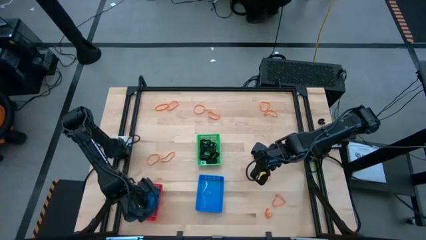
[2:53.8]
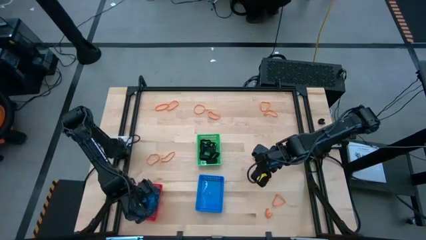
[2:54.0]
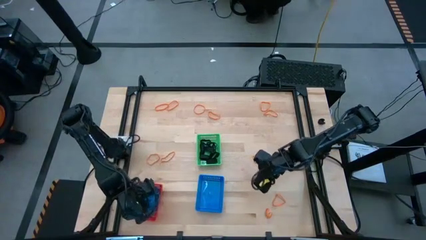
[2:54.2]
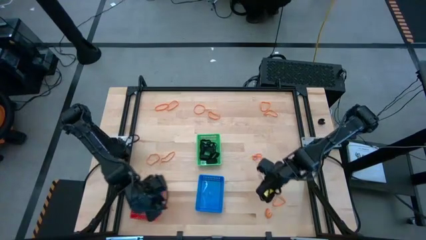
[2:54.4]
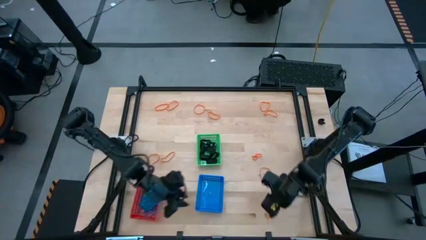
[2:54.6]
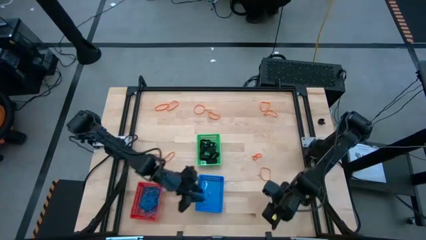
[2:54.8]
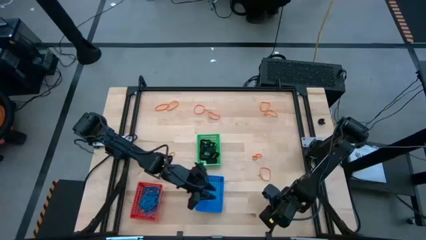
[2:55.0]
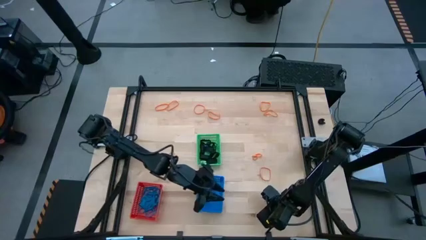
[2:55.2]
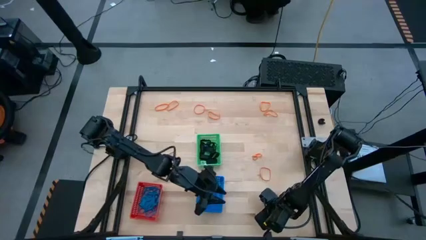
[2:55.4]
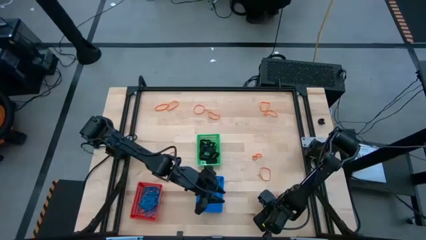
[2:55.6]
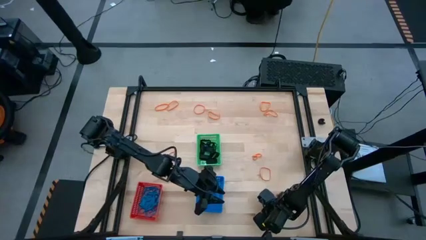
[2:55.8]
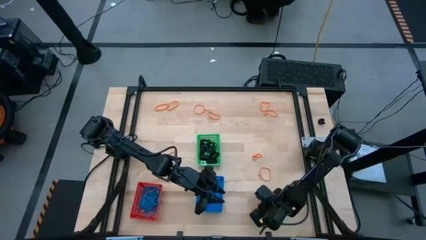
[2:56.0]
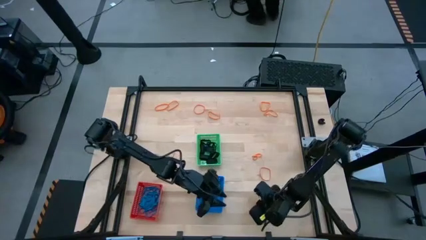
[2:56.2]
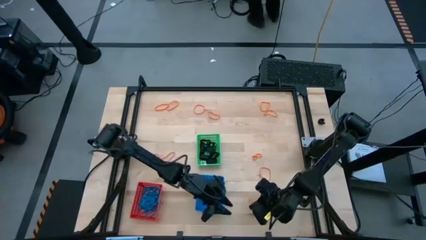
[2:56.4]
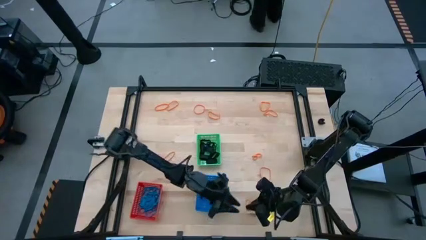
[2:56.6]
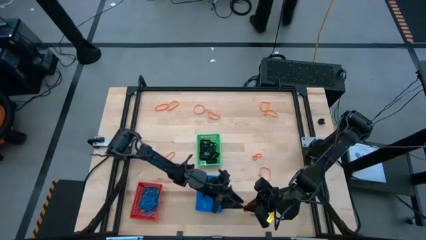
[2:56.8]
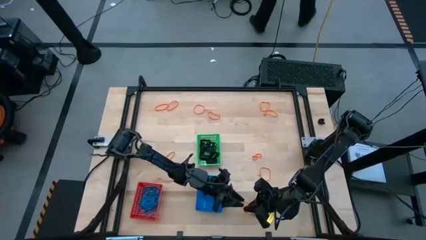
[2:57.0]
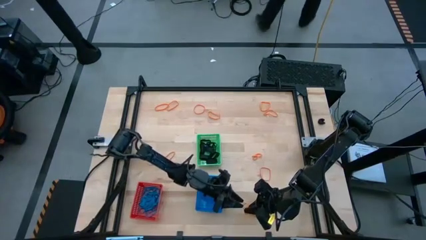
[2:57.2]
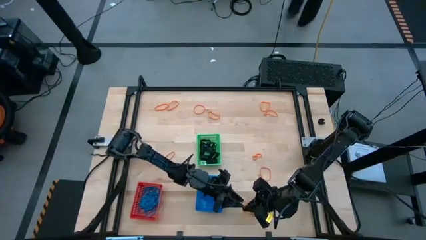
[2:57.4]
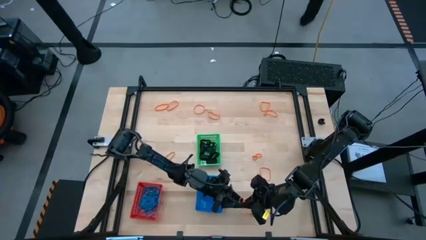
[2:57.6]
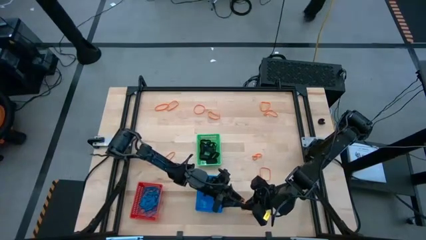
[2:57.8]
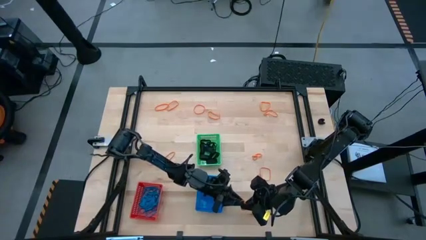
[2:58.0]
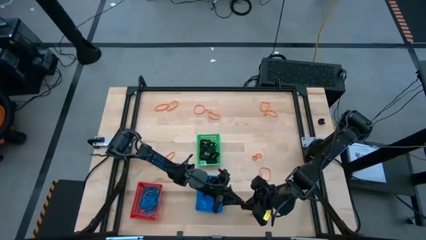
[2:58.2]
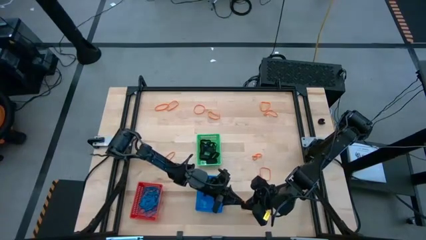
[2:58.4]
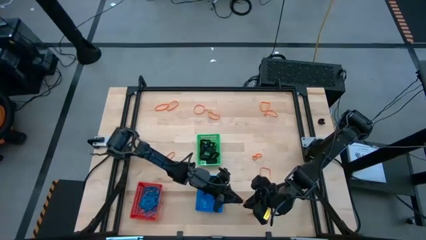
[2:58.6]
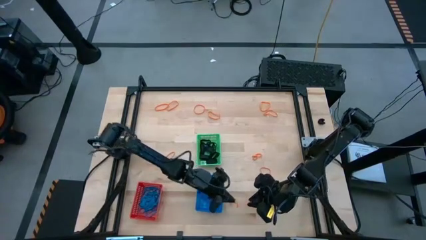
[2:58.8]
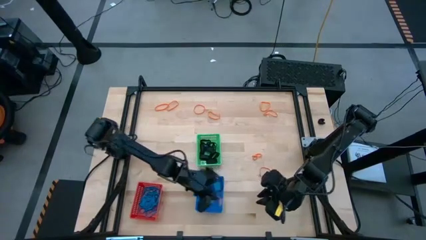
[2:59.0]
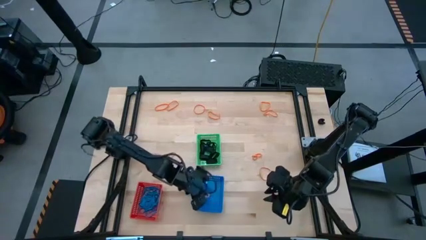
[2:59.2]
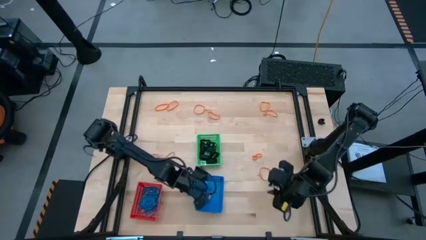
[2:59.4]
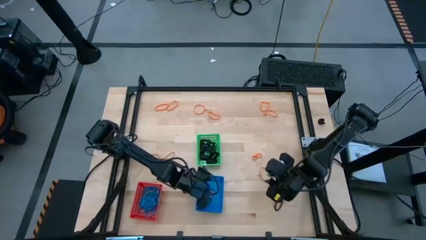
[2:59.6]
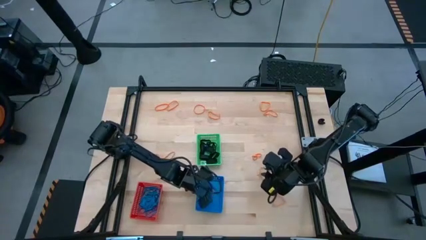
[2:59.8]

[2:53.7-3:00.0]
Task: Sort rubber bands into baskets
Put the orange rubberband into the blue bin

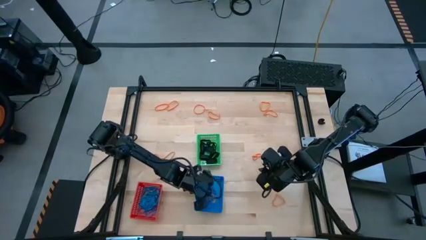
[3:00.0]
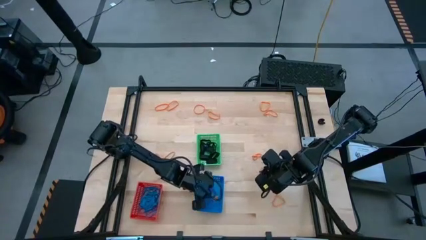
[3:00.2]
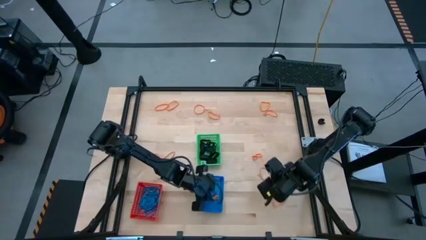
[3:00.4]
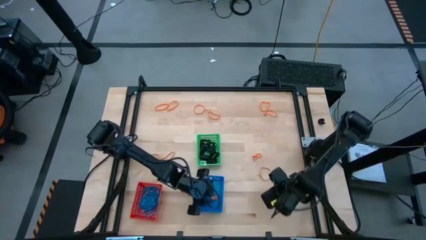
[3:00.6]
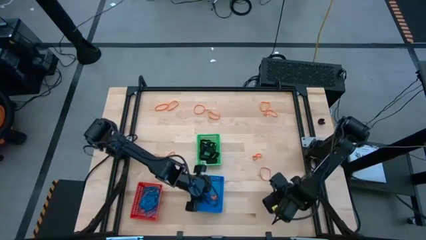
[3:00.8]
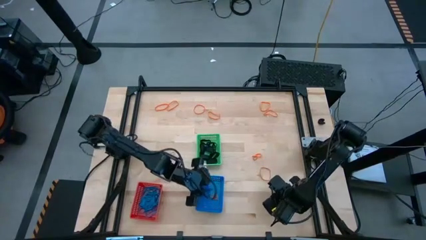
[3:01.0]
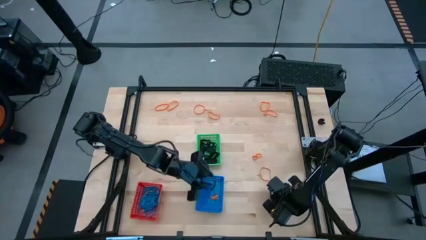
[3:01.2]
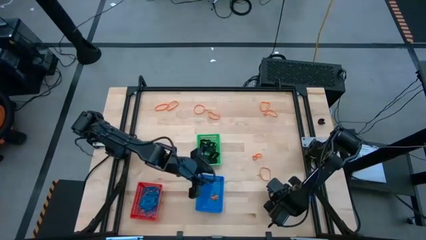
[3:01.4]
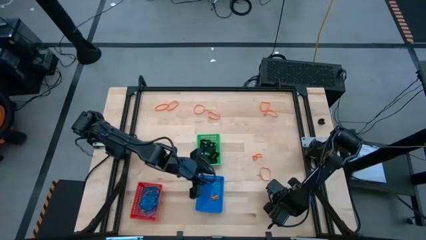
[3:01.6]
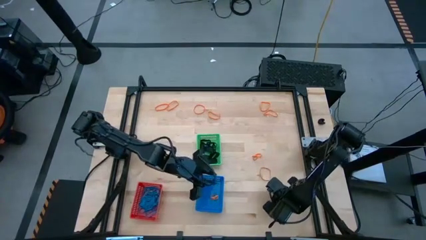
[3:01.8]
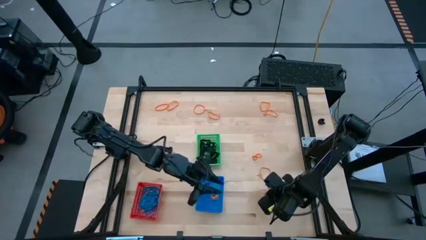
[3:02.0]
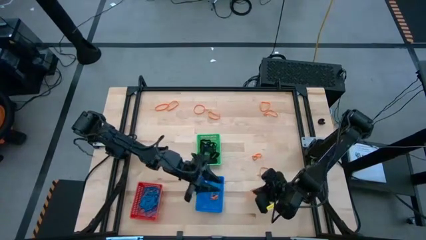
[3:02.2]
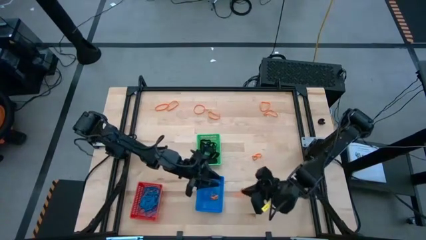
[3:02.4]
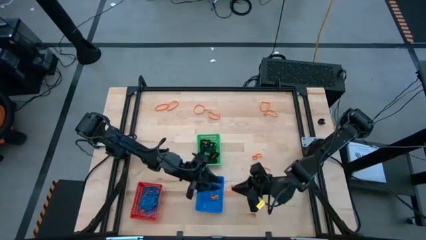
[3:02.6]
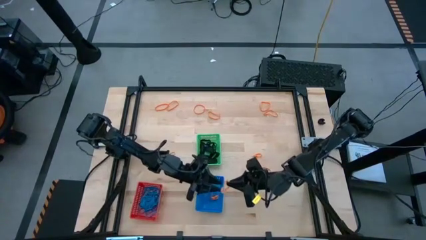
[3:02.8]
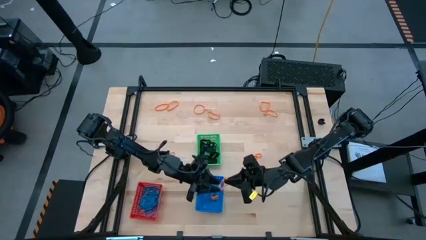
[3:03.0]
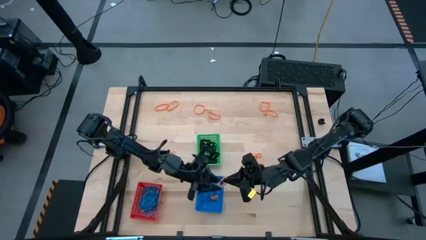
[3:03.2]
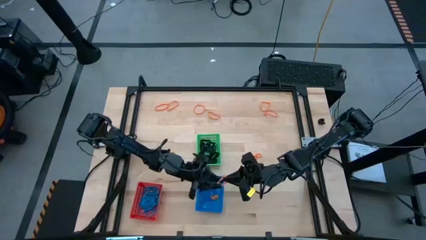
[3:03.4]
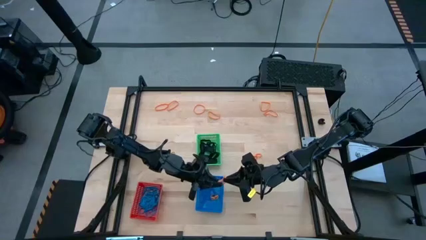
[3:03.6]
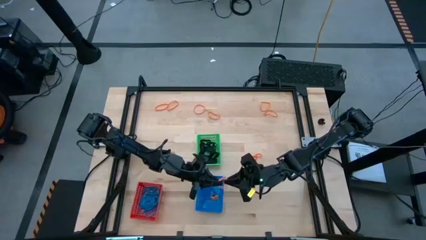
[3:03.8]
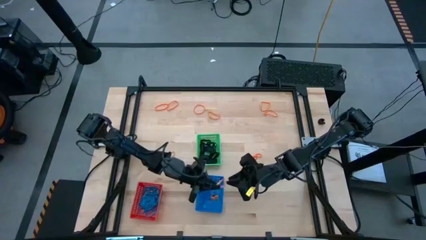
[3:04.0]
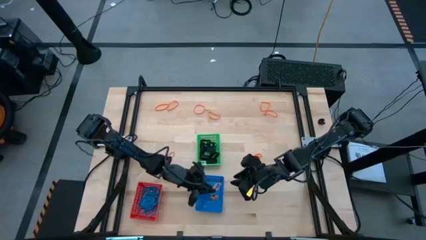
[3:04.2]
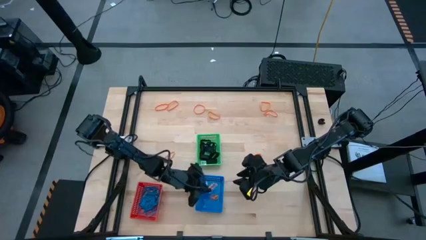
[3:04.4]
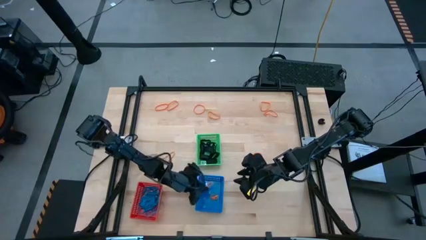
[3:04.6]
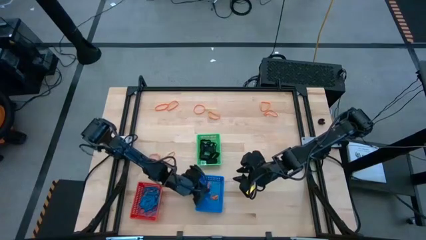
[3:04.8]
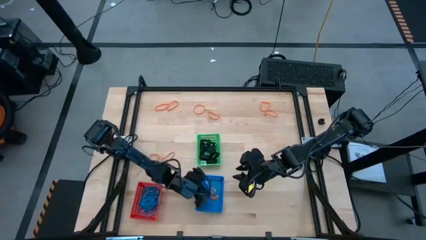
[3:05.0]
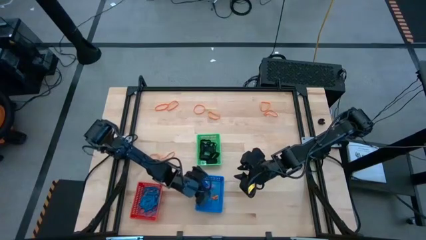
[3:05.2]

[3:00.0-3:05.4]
Put the orange rubberband into the blue bin

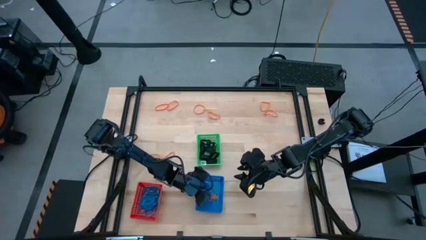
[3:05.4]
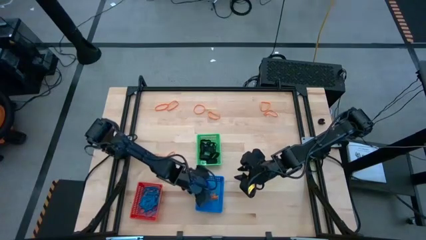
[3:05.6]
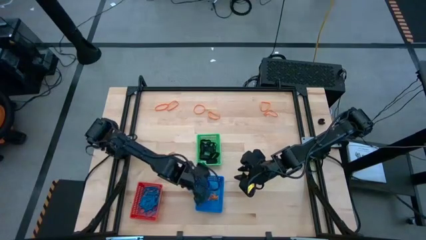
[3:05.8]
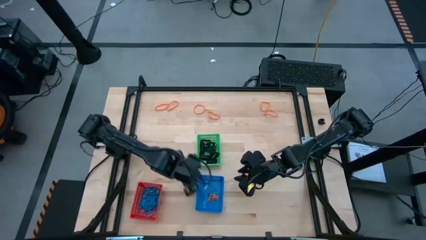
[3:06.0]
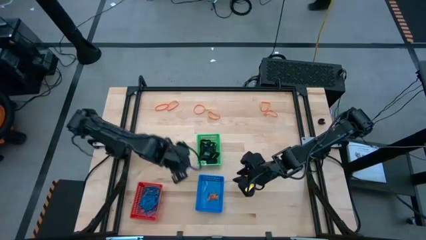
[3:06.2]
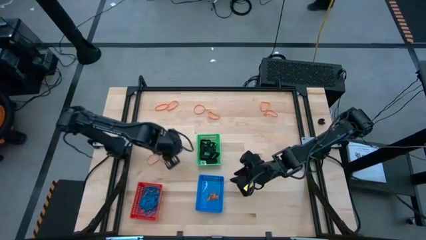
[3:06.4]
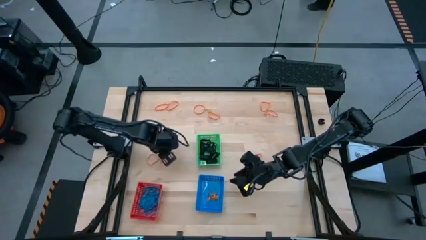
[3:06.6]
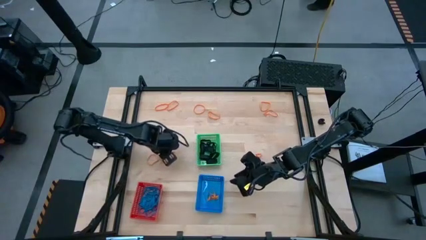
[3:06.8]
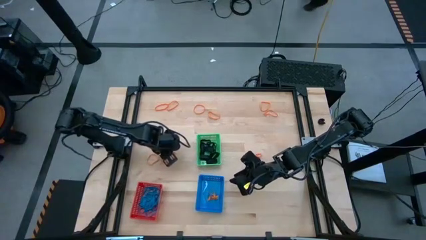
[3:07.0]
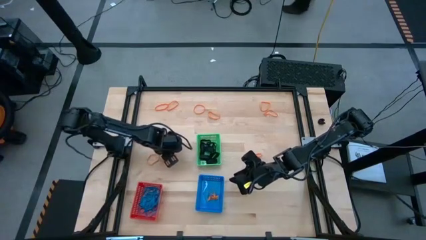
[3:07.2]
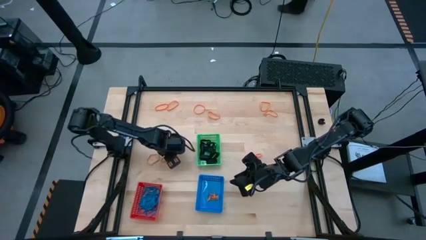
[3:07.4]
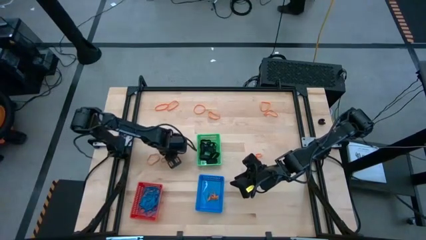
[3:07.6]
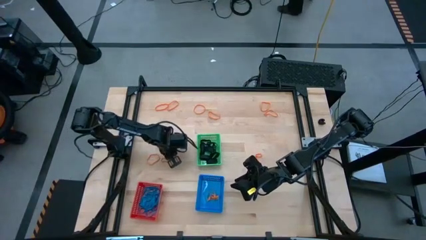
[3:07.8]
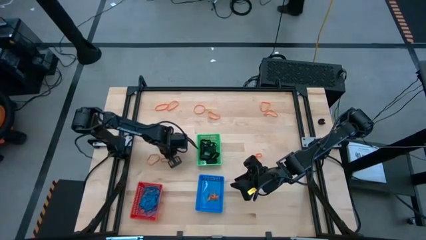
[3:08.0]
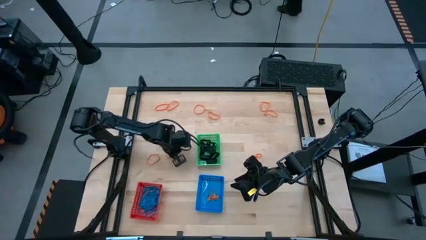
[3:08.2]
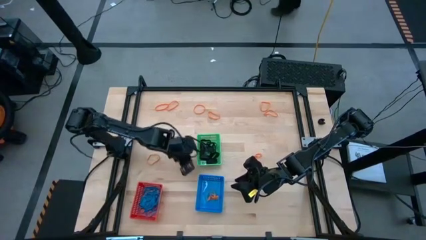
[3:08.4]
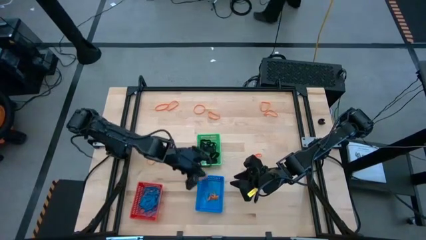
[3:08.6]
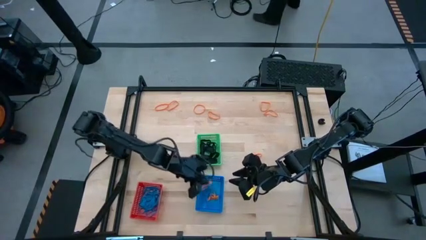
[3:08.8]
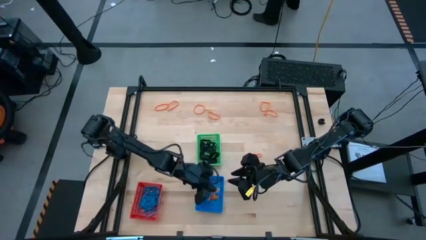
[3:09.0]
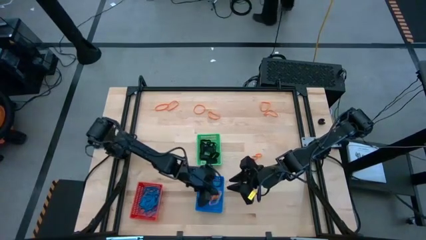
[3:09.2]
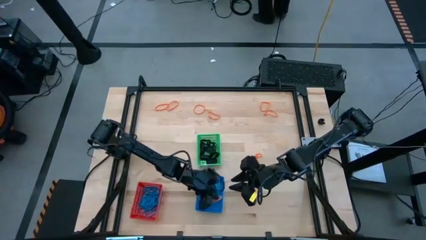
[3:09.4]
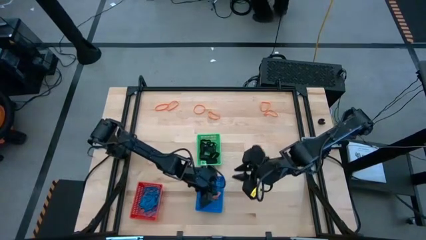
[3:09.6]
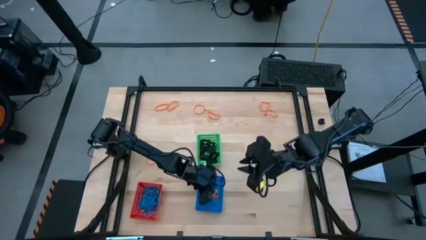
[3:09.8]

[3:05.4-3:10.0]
Put the orange rubberband into the blue bin
